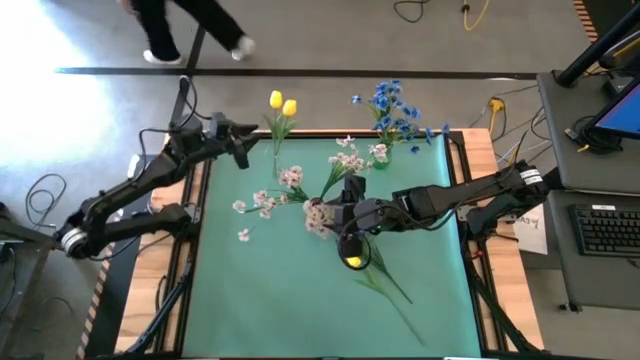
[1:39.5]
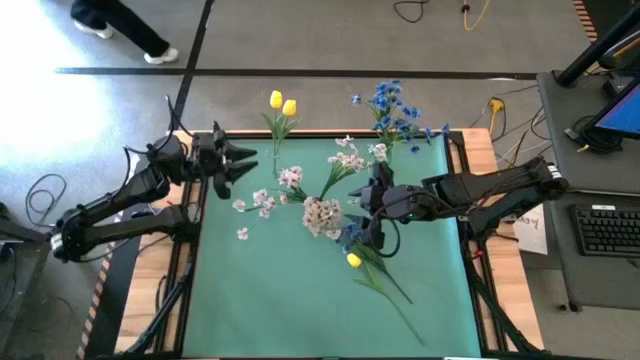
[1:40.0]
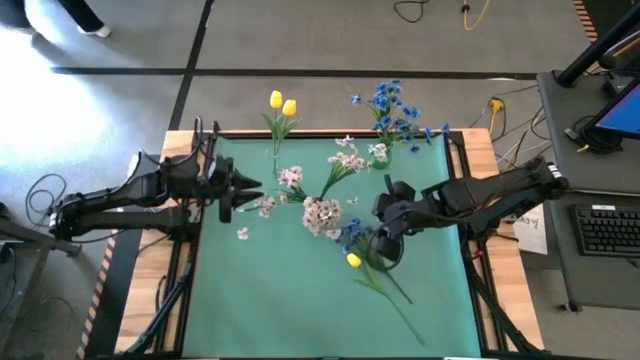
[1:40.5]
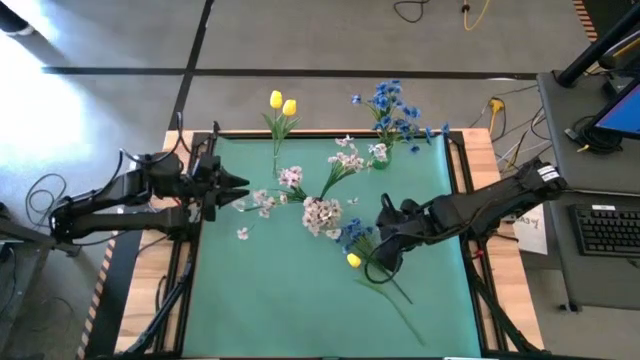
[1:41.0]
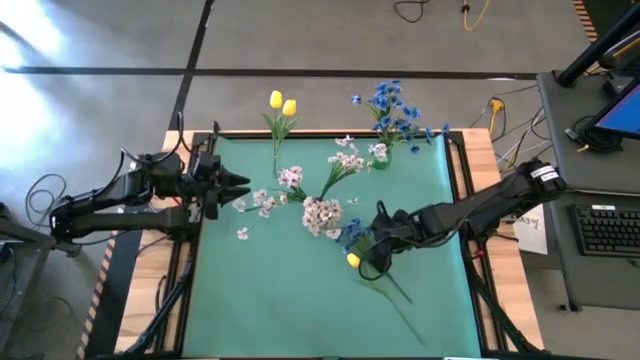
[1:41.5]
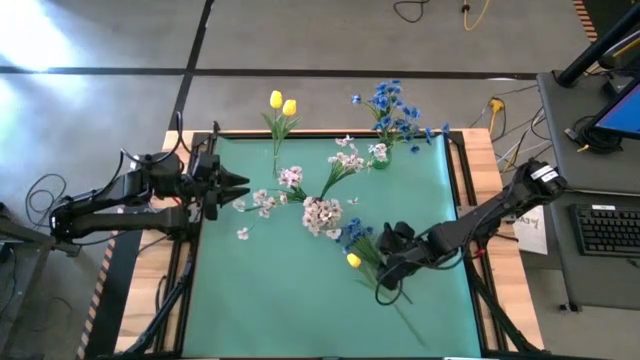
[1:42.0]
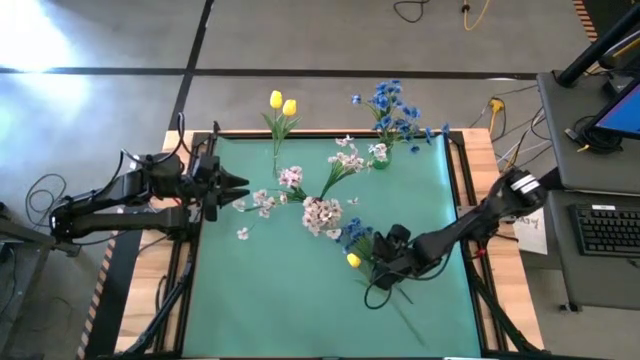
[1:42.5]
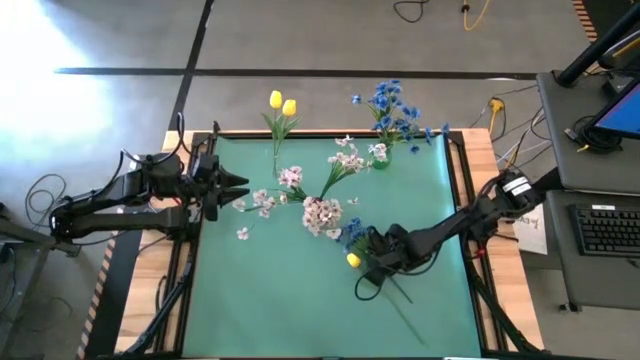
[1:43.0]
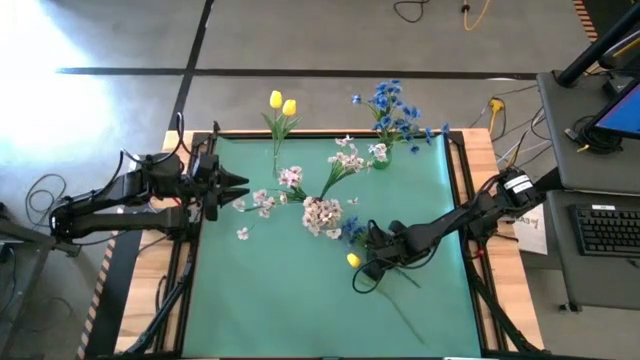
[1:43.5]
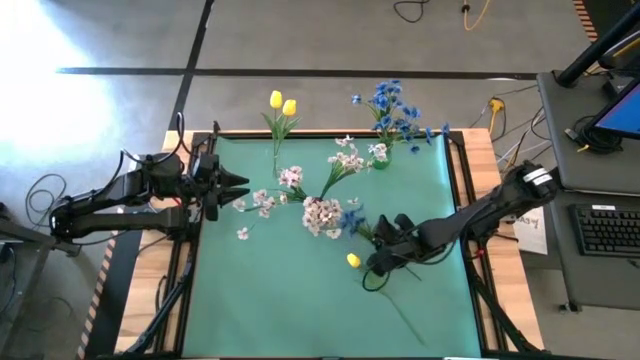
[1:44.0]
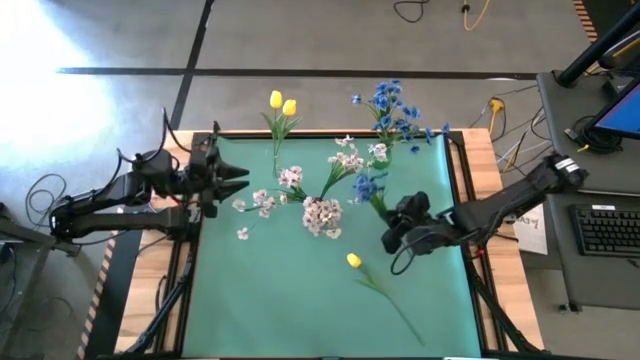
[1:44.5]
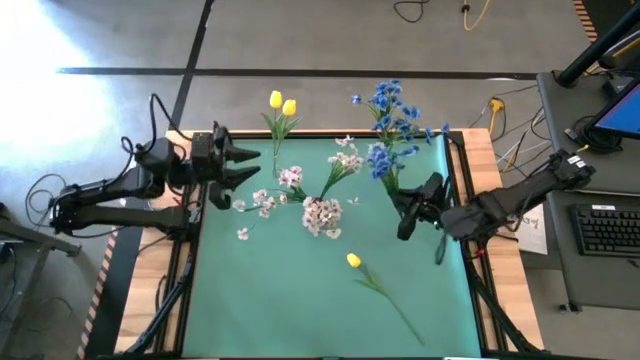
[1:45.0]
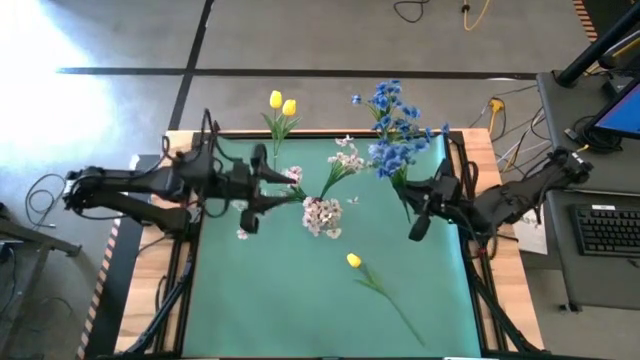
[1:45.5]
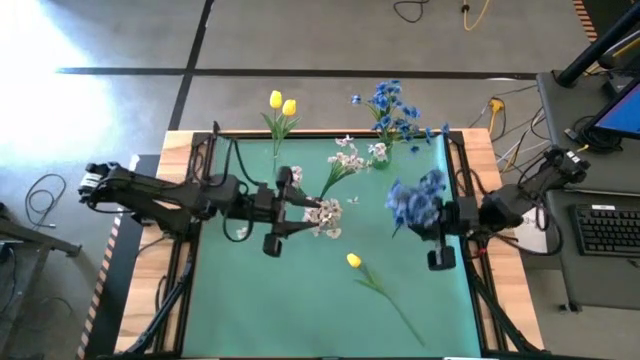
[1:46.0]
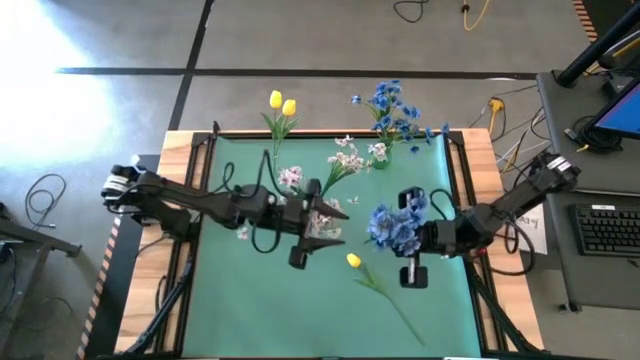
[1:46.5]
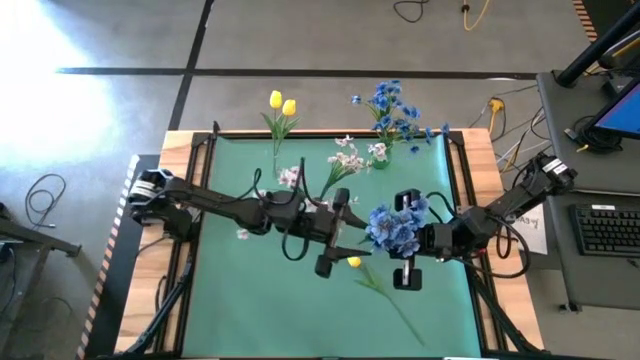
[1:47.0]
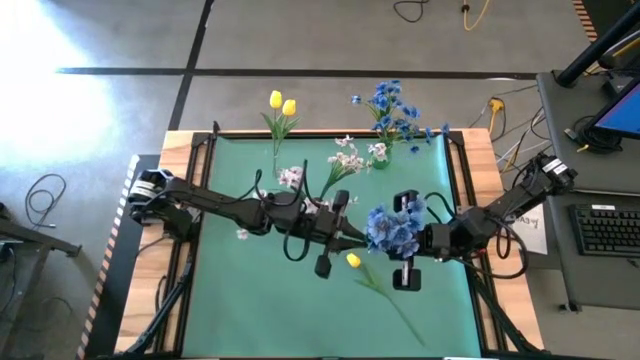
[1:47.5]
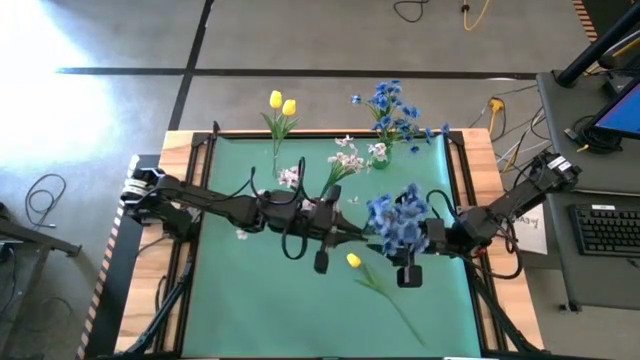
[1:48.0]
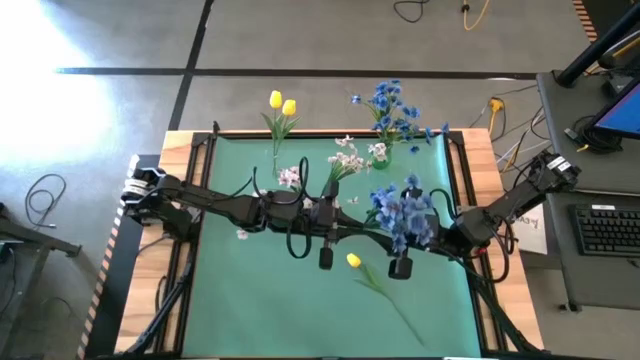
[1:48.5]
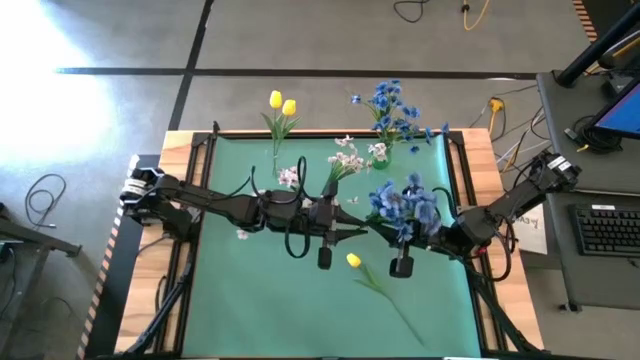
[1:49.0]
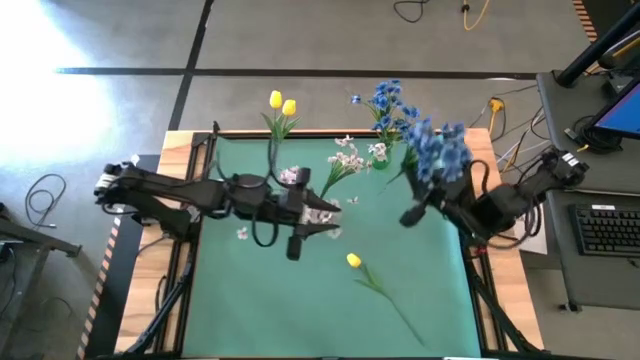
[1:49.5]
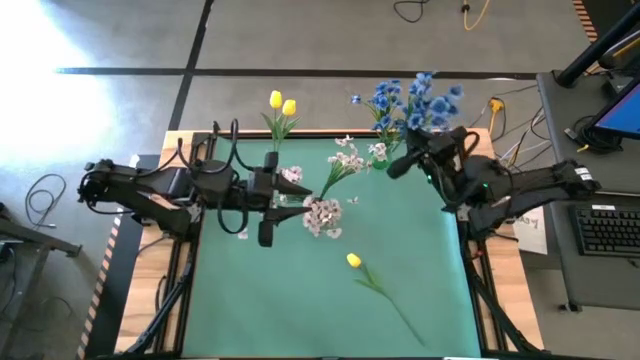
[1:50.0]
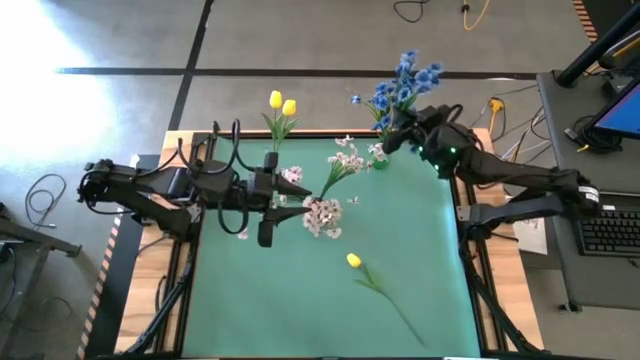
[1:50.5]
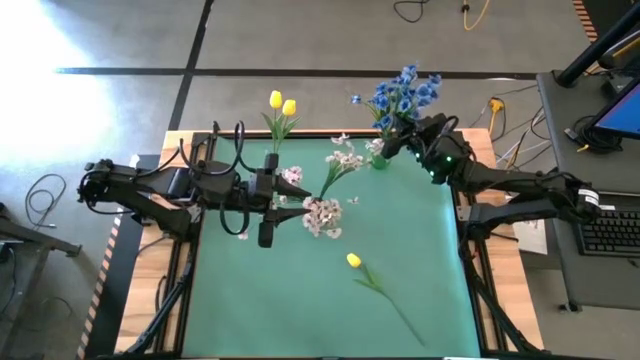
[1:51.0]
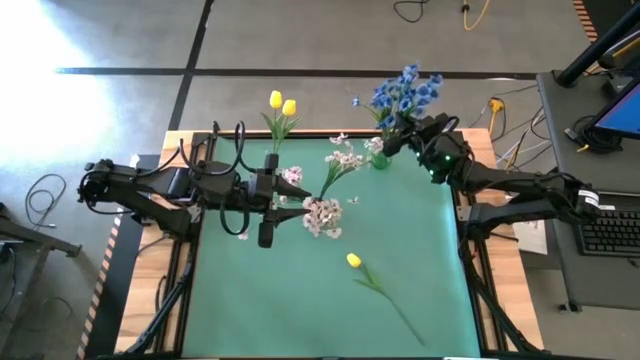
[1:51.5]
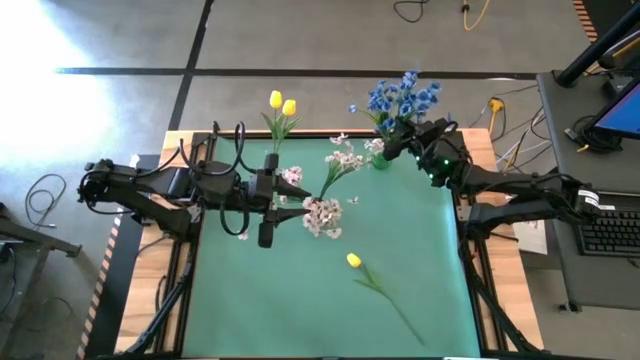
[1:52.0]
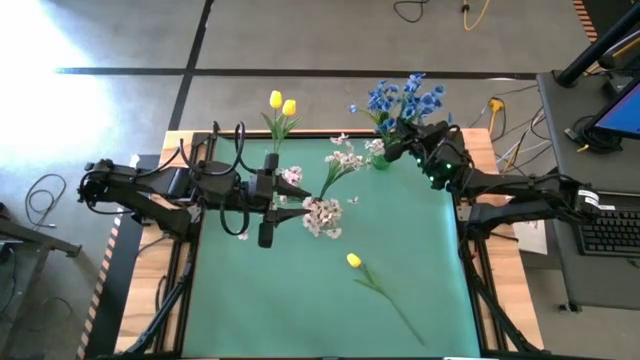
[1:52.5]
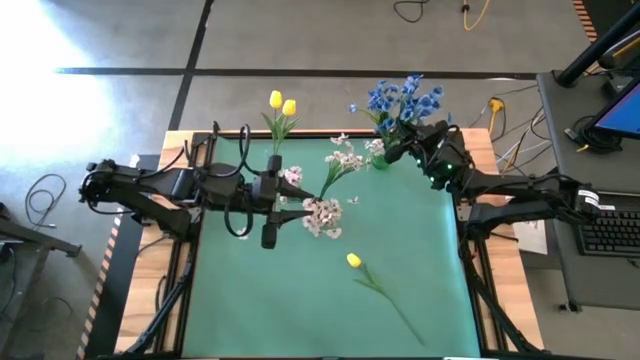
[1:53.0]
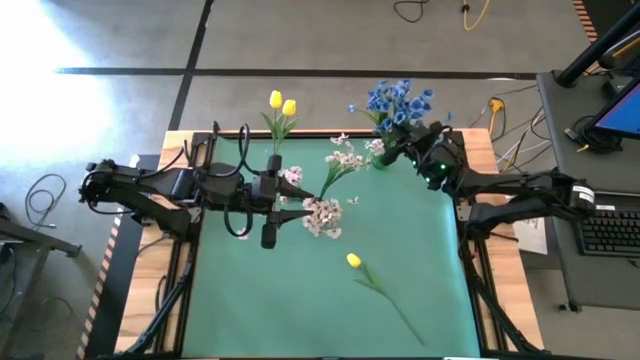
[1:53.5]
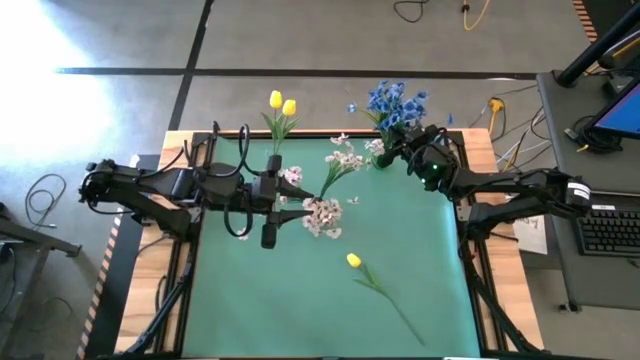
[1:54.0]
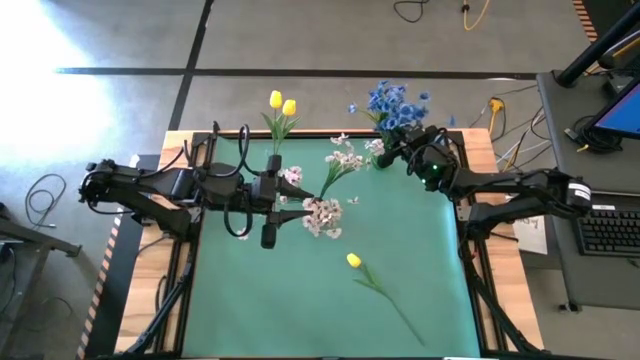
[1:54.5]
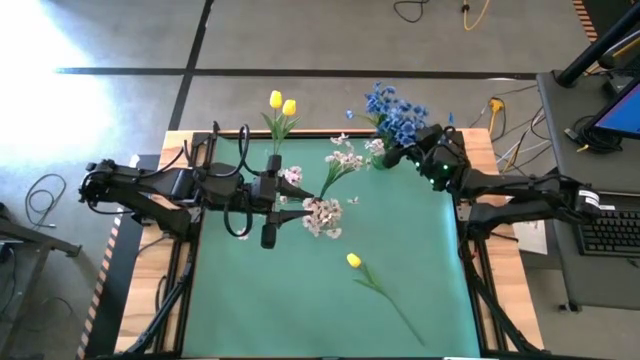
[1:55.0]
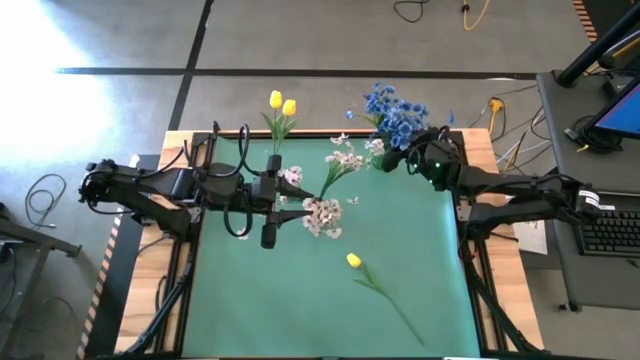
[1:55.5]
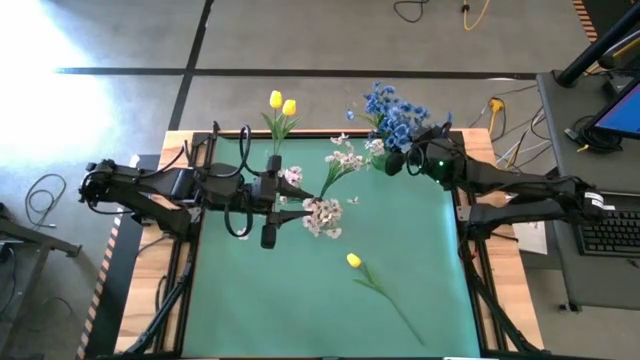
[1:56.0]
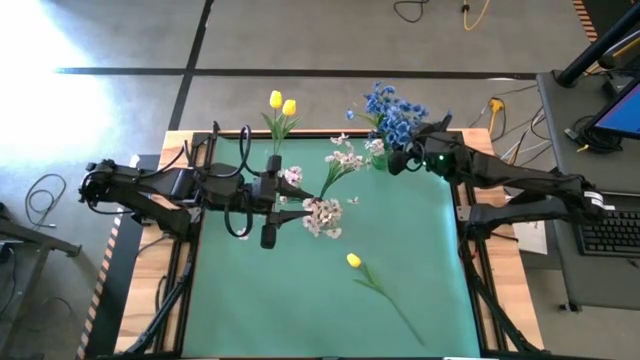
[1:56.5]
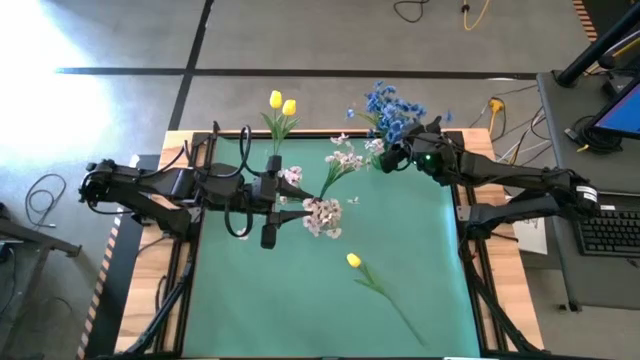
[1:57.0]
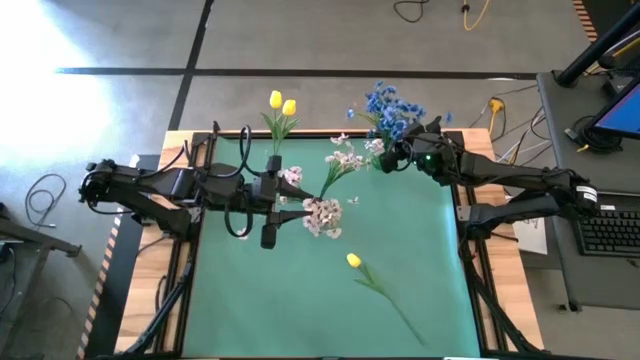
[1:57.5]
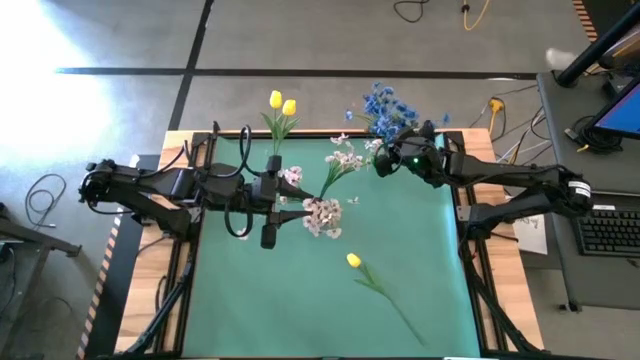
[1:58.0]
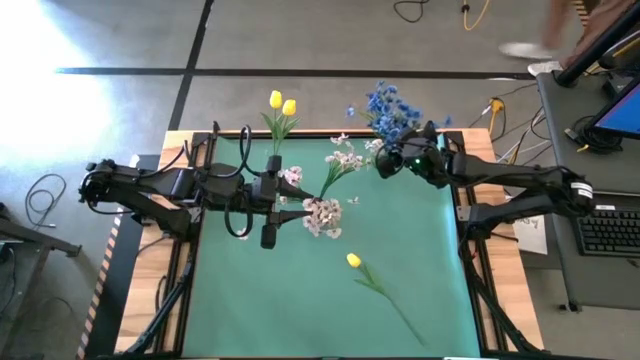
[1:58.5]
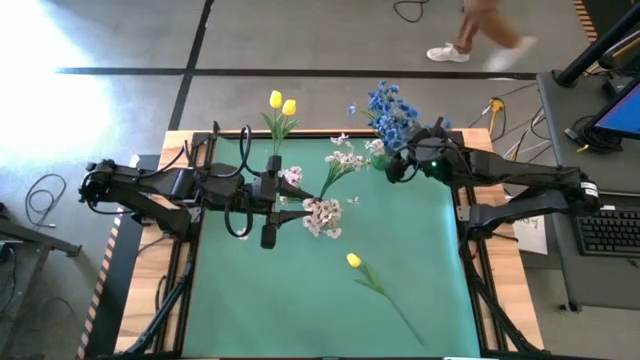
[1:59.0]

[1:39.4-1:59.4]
Task: Sort flowers into vase by color
Put the blue flowers into the green vase
